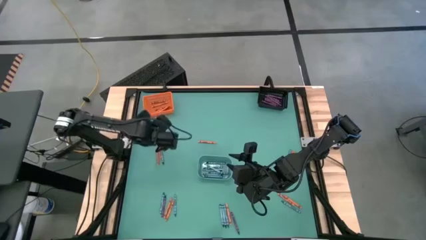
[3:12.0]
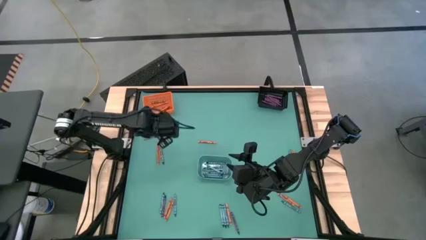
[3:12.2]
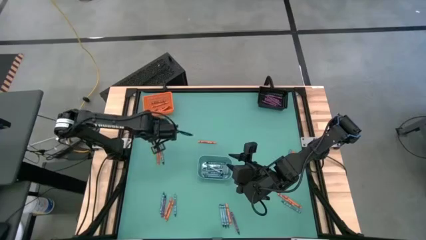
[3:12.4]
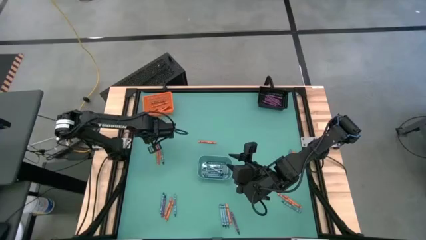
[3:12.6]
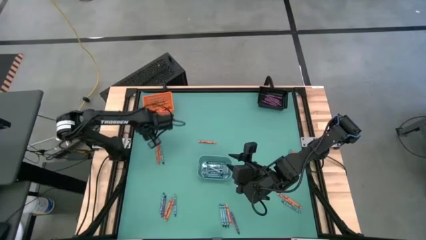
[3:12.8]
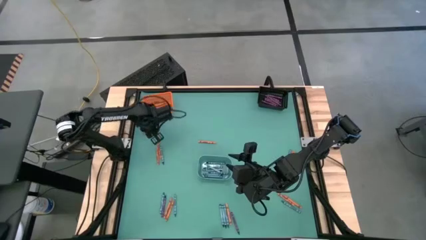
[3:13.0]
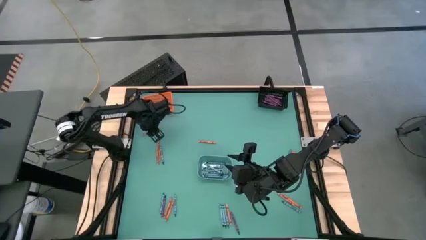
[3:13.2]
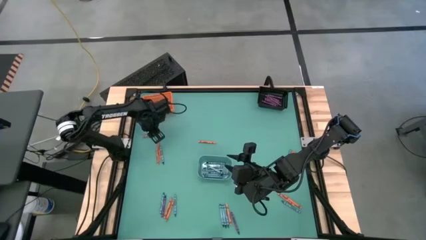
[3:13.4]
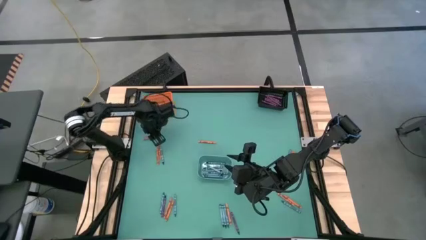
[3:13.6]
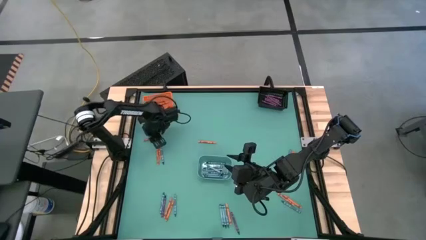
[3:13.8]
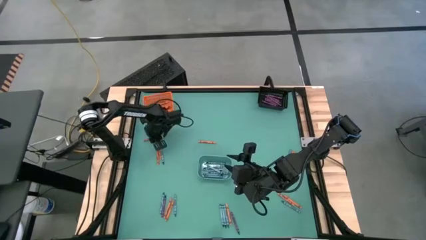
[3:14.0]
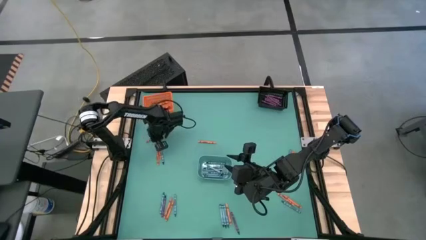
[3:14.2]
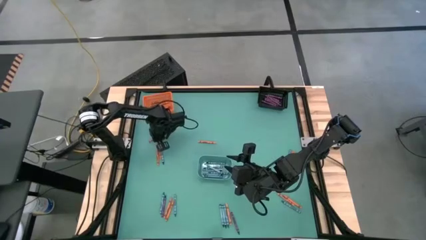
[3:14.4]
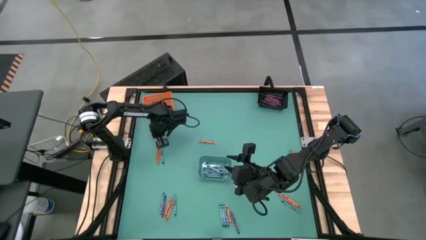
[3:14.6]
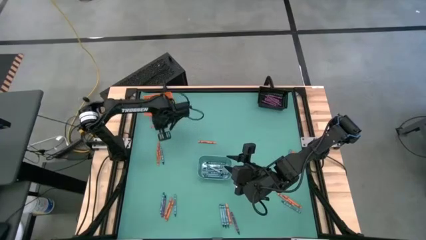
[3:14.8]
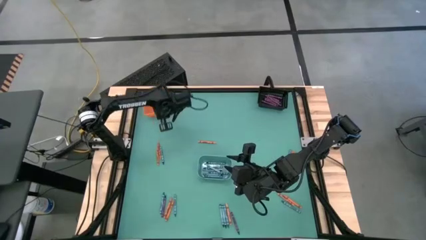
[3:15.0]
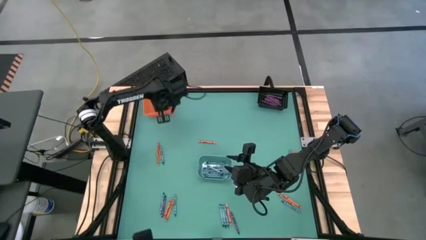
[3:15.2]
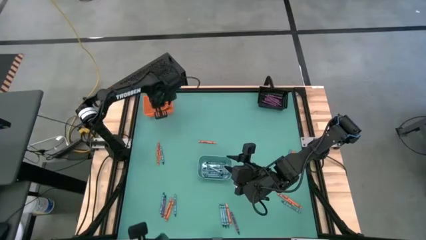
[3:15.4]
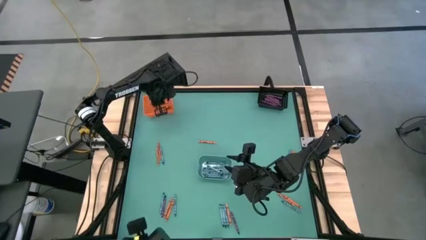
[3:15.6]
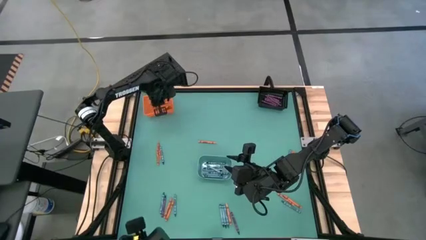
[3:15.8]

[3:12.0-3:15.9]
Task: Sort crayons
Put the orange crayon into the orange bin

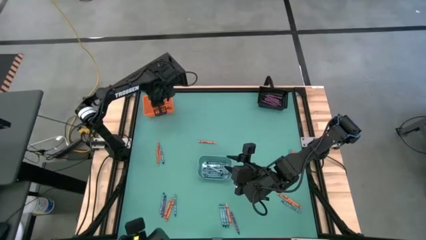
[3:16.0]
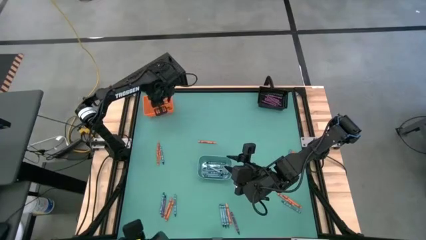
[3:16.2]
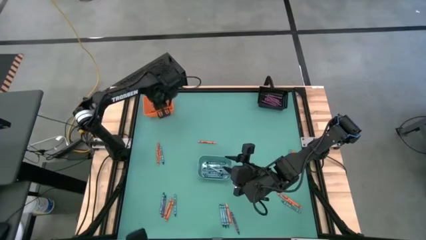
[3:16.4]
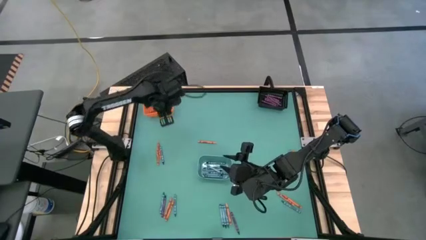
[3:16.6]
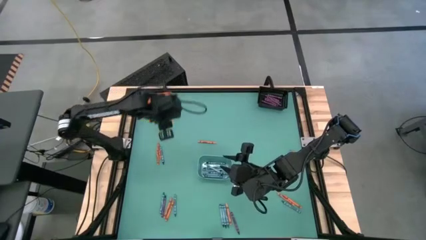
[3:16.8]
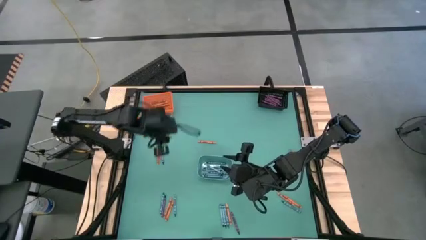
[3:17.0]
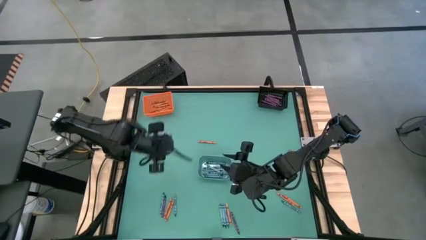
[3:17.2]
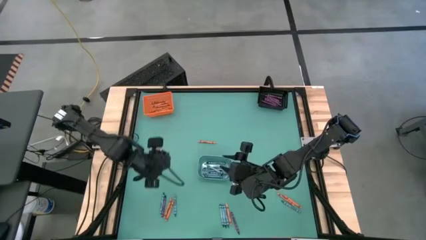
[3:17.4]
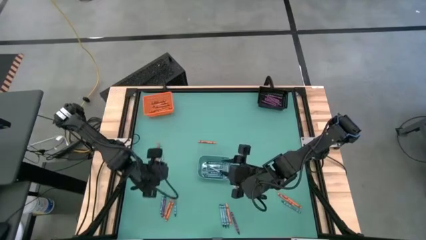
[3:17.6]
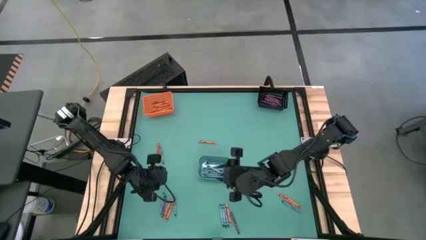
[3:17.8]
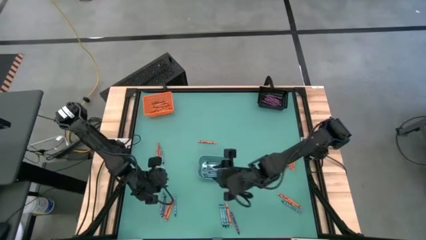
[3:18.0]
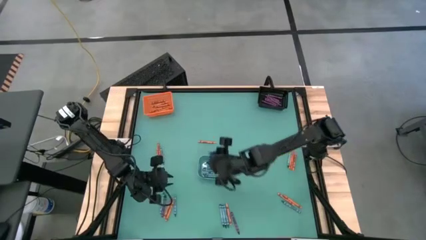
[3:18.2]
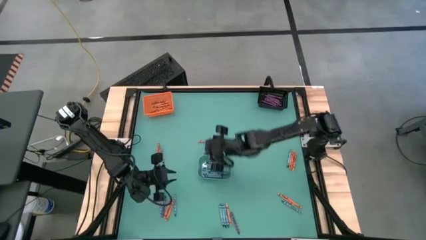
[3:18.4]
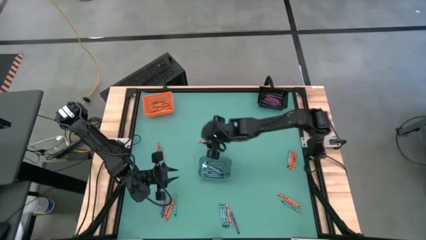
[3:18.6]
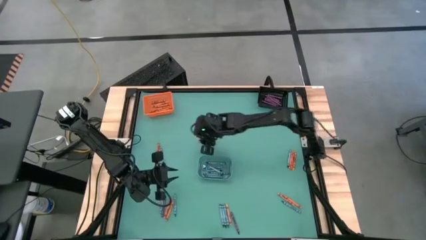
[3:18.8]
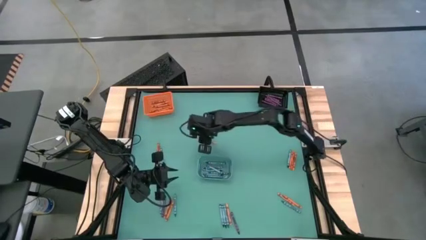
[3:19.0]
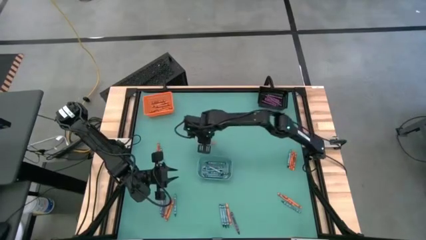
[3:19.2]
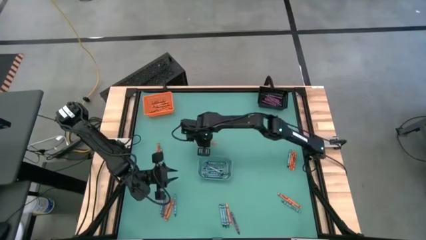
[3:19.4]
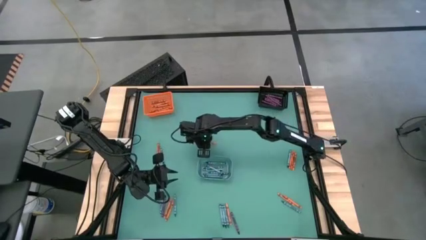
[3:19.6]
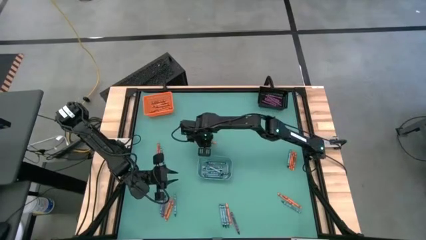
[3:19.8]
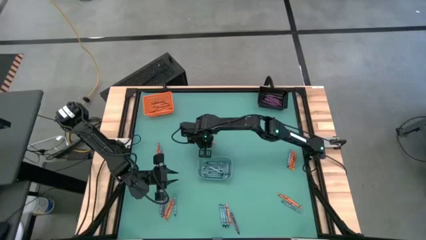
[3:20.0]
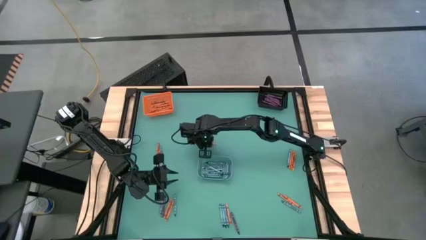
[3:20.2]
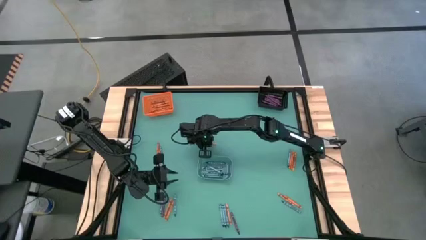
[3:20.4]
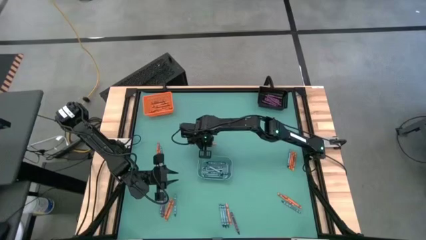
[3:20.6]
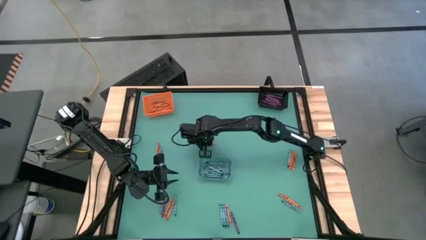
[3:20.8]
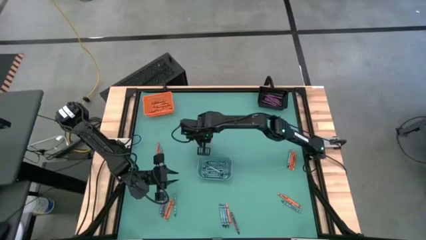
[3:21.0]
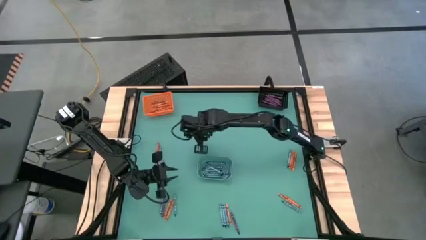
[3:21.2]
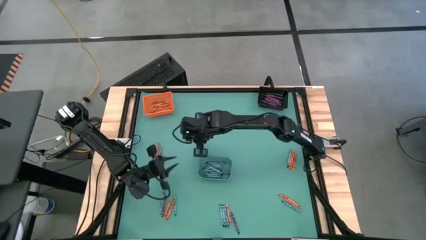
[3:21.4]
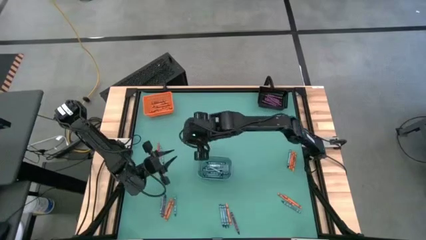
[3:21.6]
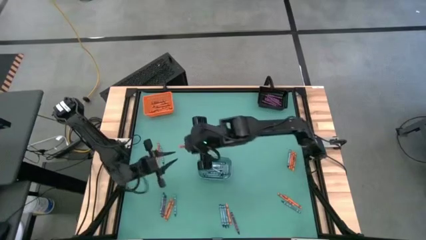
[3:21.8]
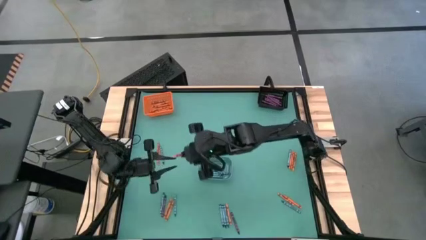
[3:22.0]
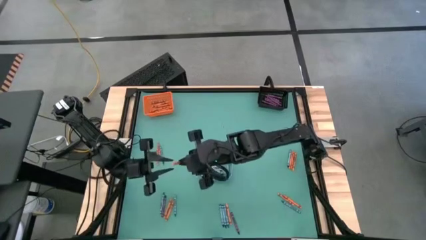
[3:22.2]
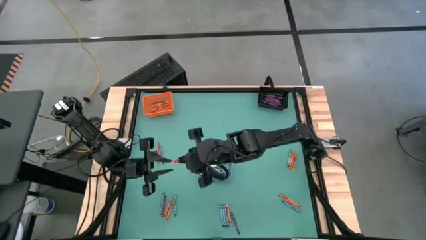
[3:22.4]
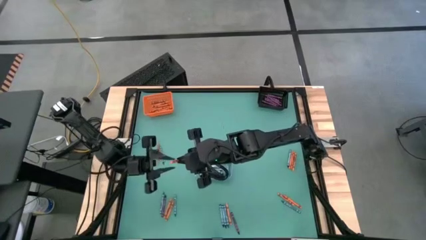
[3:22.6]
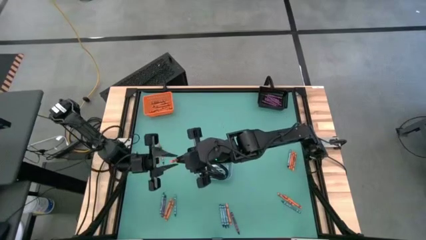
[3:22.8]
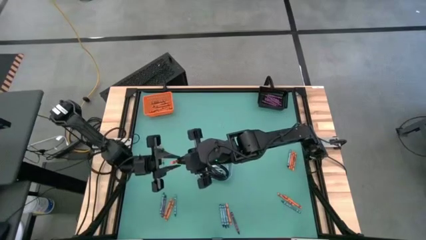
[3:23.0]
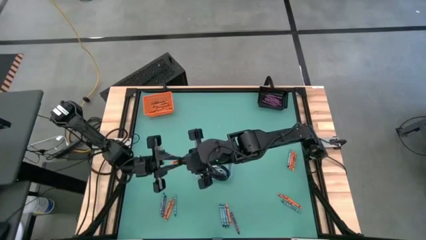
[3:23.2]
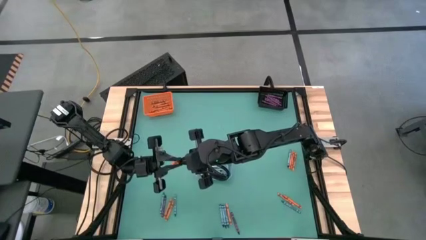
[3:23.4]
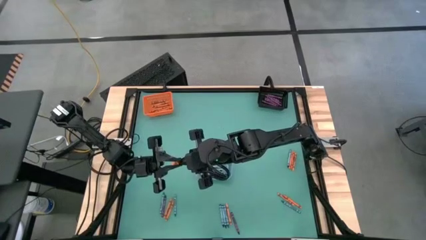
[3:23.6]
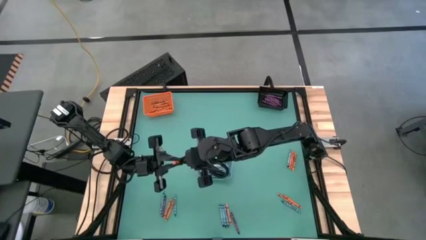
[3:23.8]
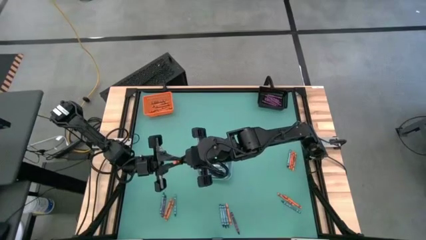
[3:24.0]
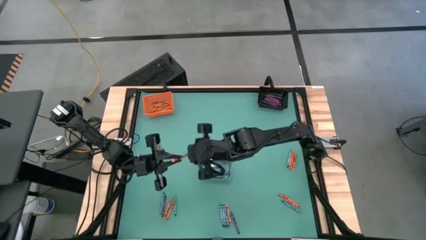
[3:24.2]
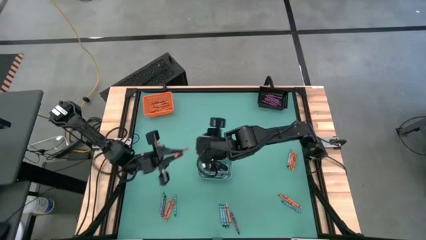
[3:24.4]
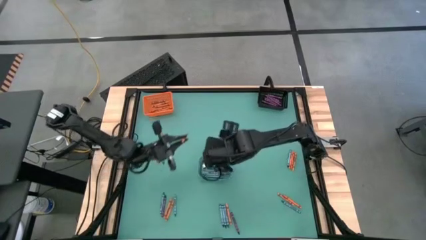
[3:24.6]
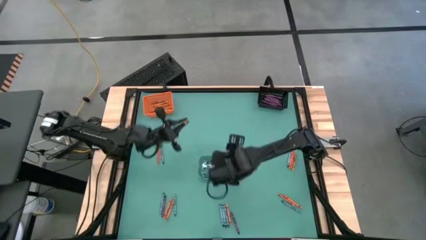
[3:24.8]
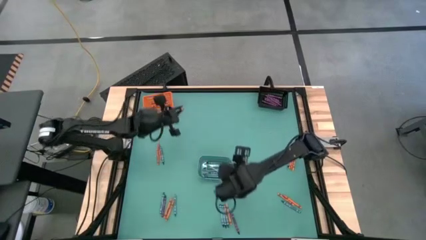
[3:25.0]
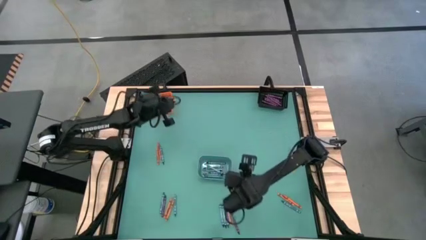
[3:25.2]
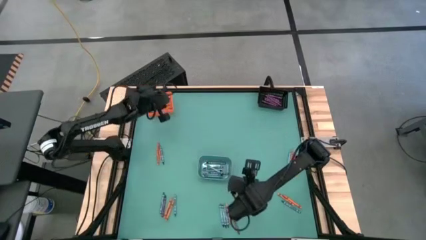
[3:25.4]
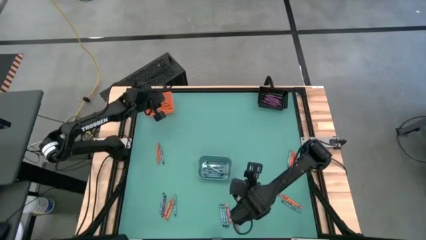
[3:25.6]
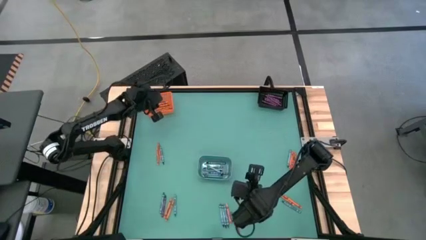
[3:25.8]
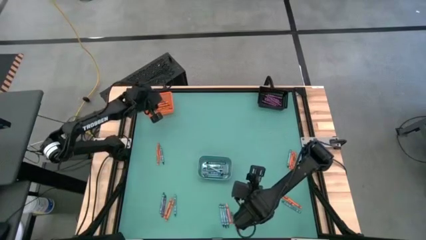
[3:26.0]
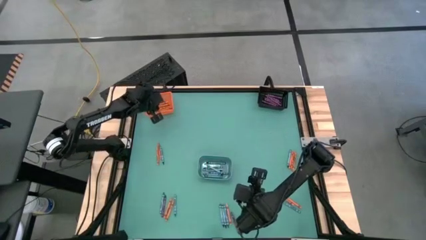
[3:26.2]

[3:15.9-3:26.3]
Put the orange crayon into the orange bin

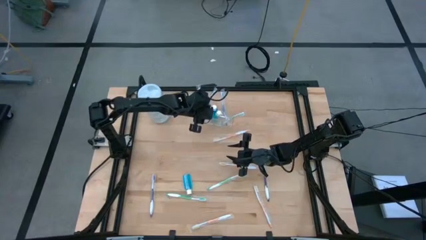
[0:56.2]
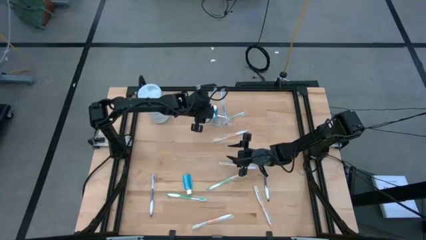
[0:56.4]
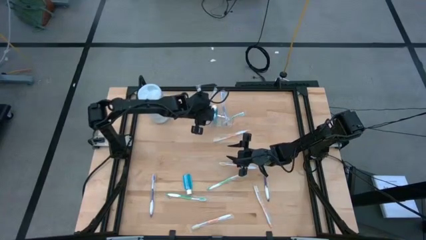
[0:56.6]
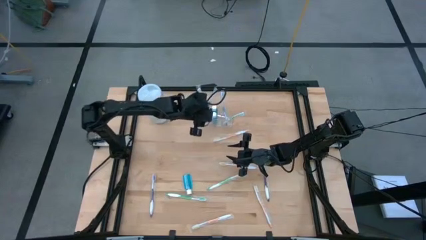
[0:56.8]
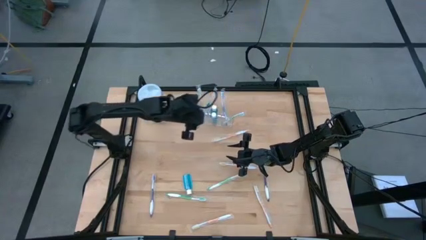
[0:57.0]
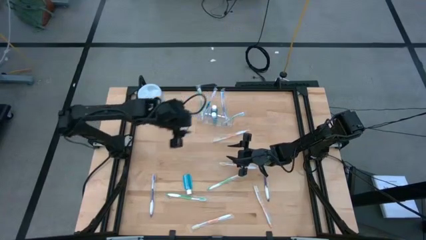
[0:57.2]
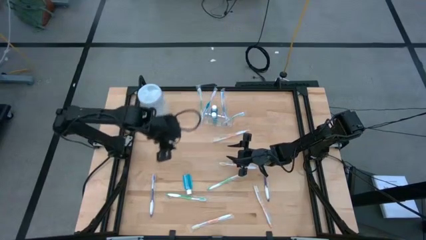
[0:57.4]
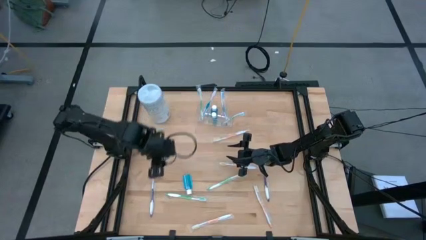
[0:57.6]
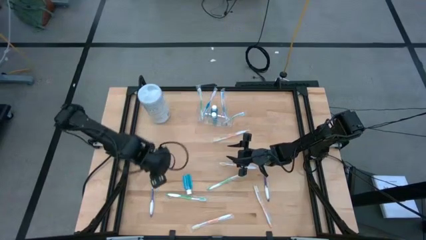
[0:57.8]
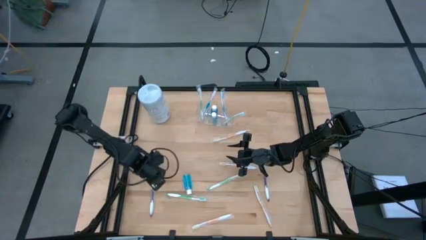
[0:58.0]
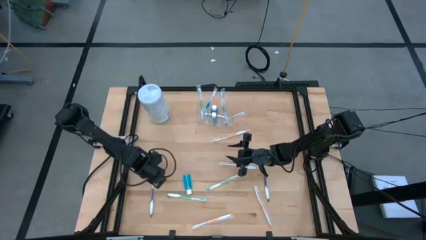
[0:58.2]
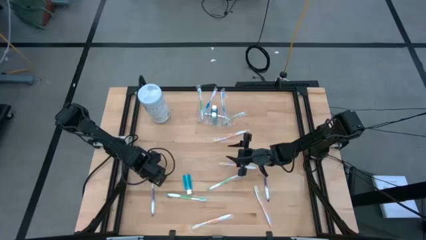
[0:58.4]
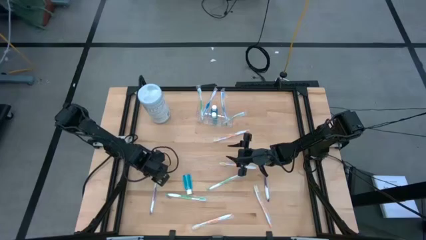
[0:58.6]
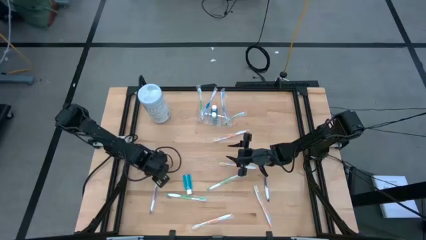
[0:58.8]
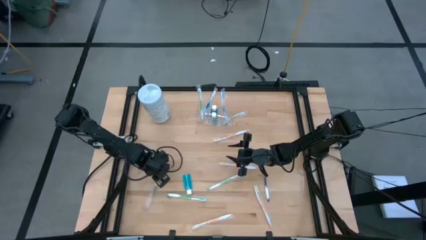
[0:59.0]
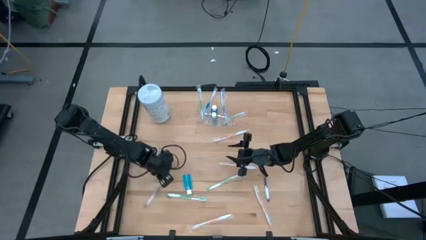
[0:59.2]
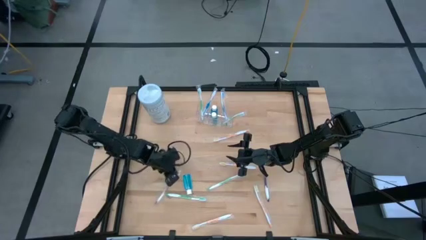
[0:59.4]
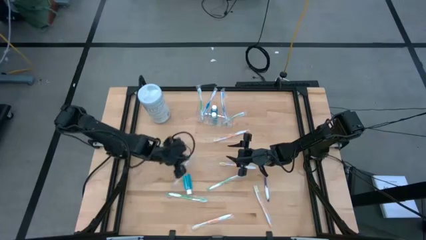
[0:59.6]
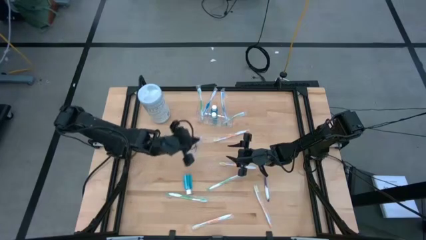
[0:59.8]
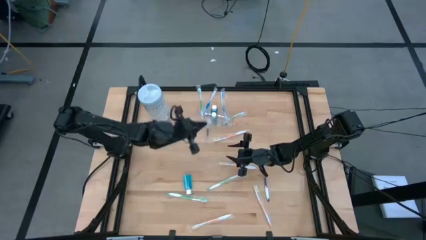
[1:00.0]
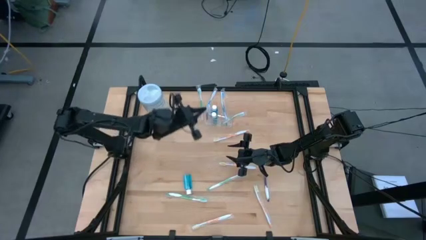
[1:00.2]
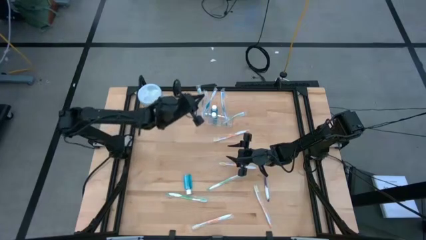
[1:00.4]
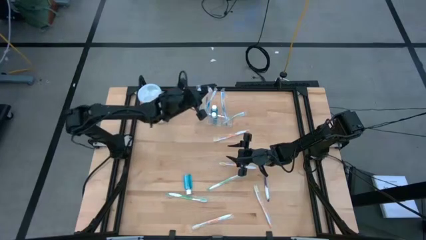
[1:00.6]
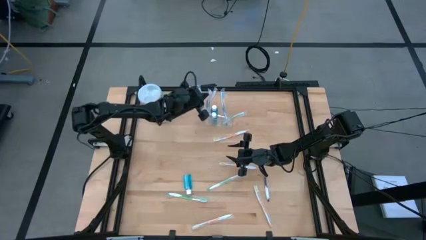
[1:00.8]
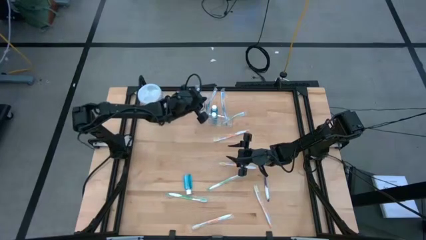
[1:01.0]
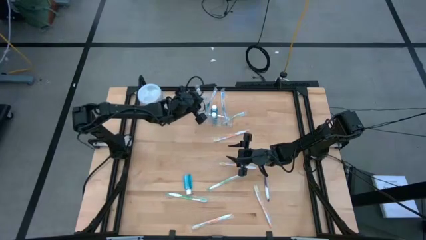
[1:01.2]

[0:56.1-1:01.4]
Task: Pick & Place toothbrushing station
Put the purple toothbrush into the transparent organizer
